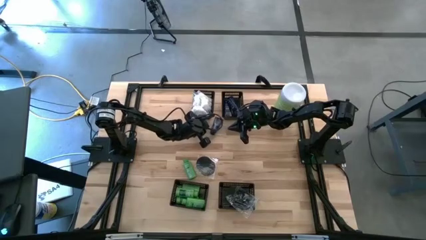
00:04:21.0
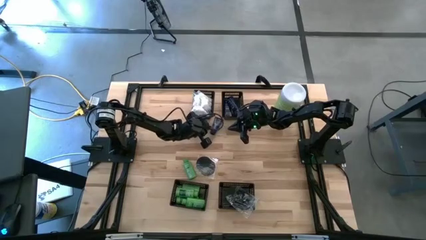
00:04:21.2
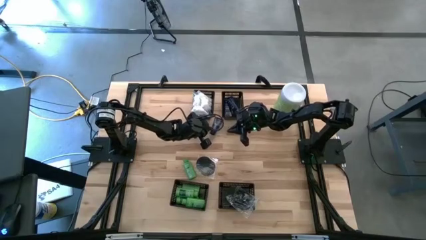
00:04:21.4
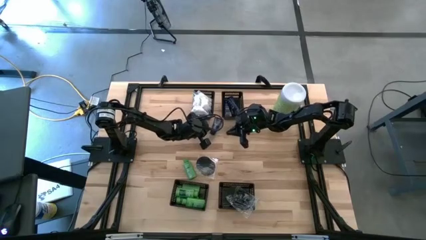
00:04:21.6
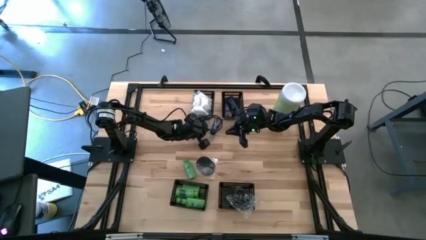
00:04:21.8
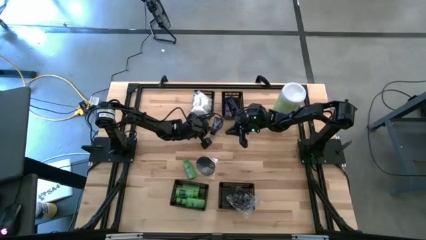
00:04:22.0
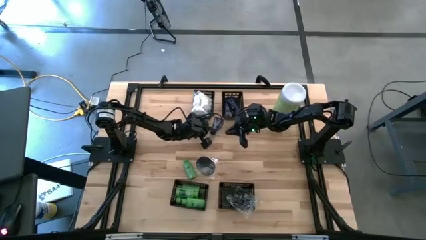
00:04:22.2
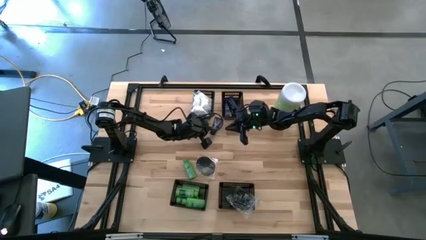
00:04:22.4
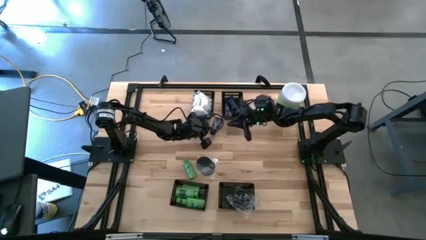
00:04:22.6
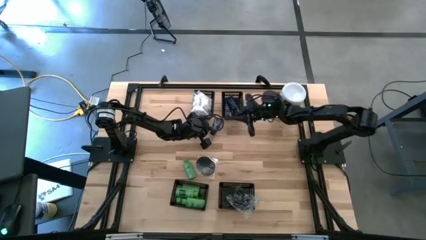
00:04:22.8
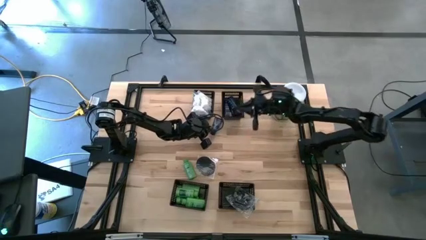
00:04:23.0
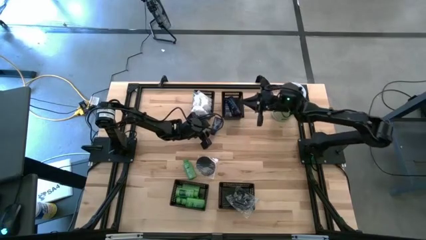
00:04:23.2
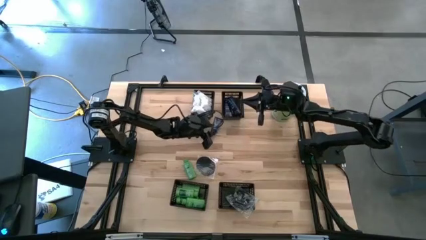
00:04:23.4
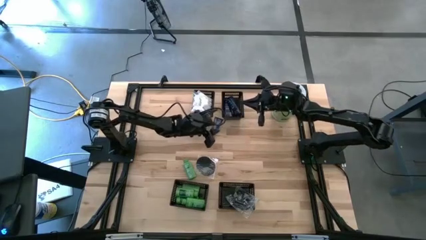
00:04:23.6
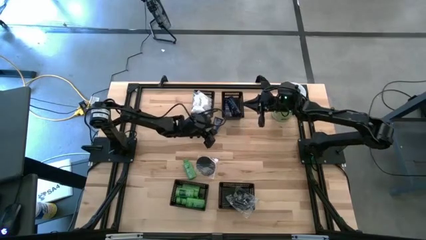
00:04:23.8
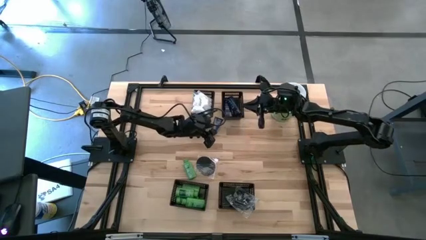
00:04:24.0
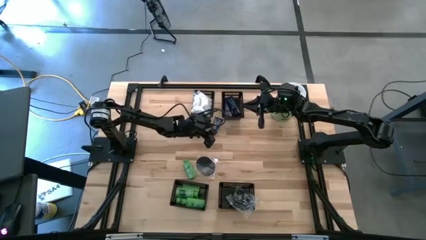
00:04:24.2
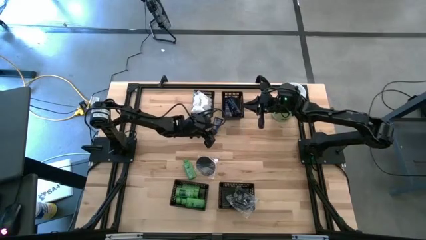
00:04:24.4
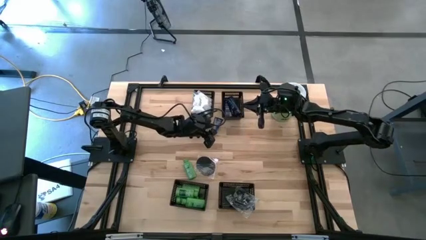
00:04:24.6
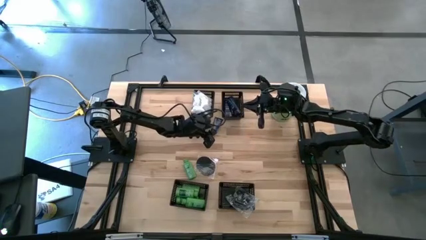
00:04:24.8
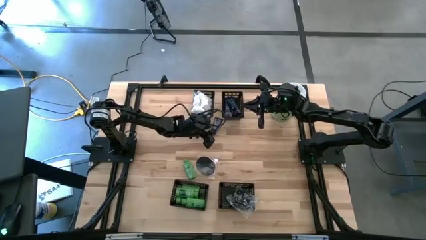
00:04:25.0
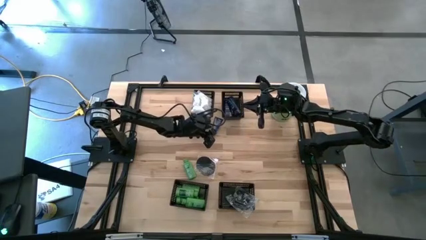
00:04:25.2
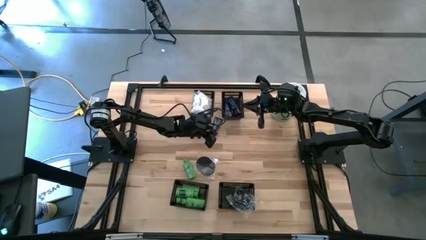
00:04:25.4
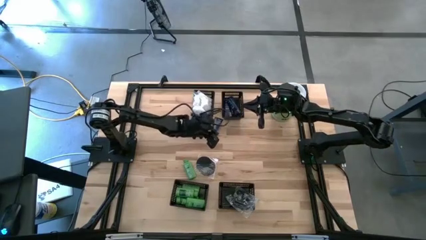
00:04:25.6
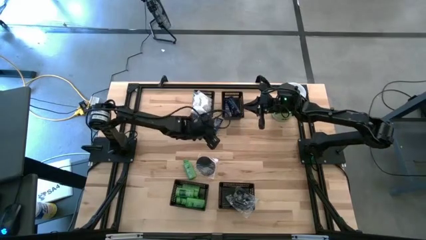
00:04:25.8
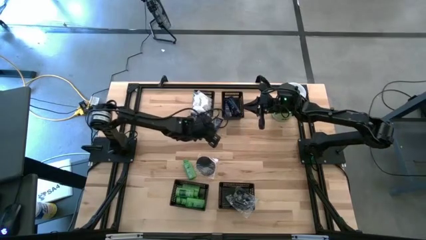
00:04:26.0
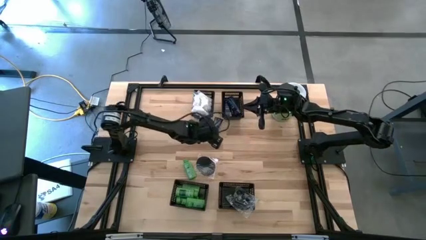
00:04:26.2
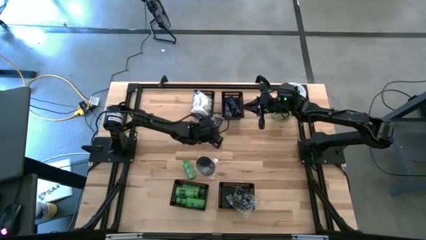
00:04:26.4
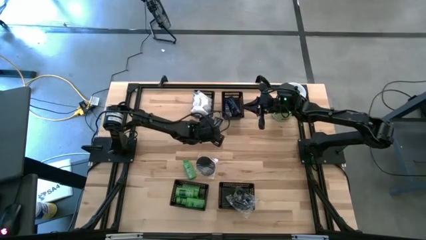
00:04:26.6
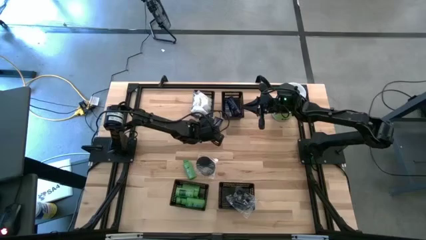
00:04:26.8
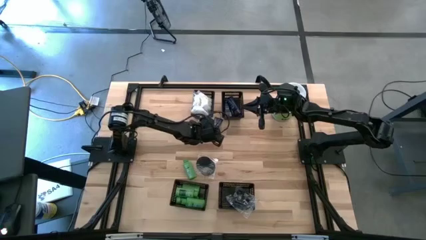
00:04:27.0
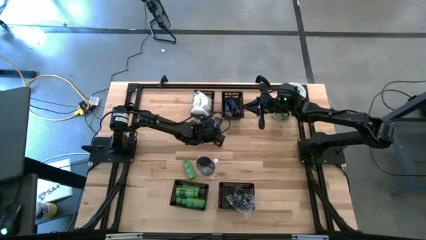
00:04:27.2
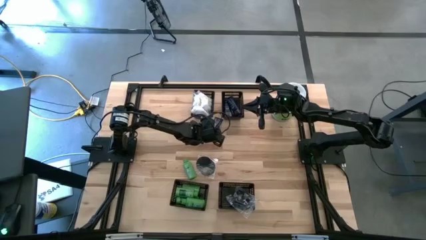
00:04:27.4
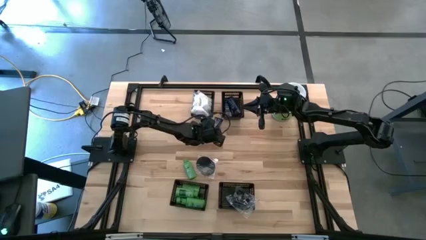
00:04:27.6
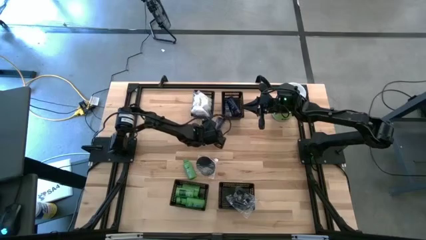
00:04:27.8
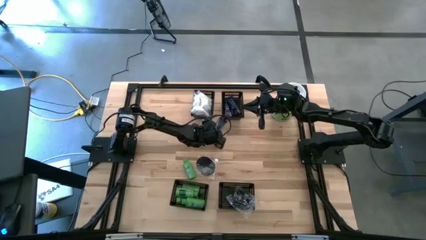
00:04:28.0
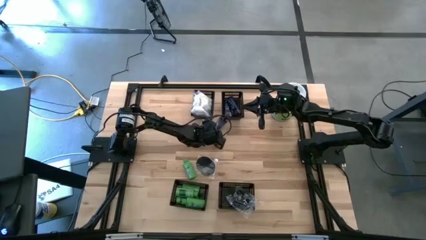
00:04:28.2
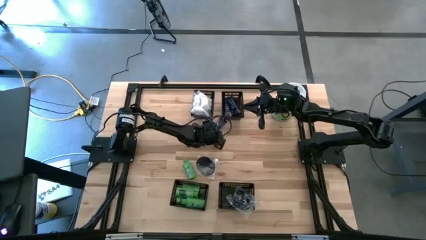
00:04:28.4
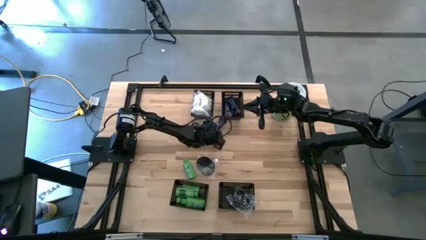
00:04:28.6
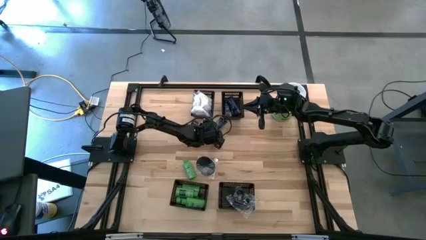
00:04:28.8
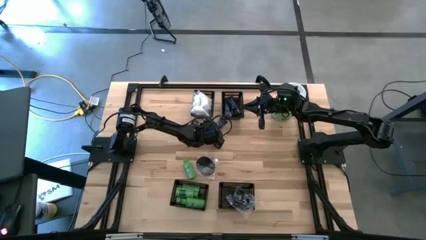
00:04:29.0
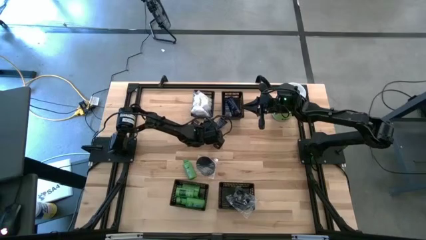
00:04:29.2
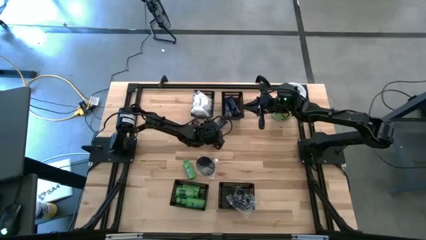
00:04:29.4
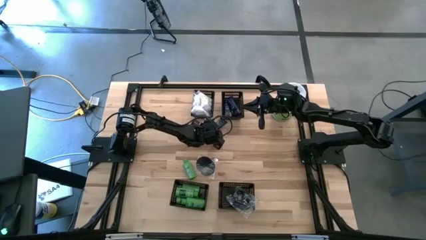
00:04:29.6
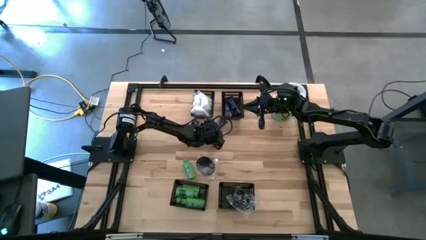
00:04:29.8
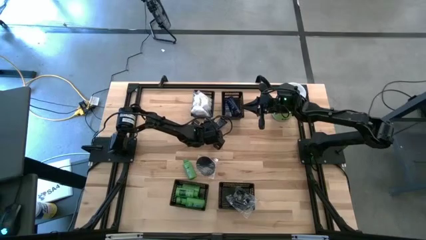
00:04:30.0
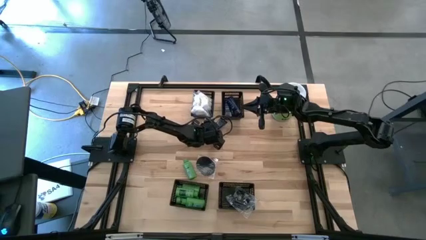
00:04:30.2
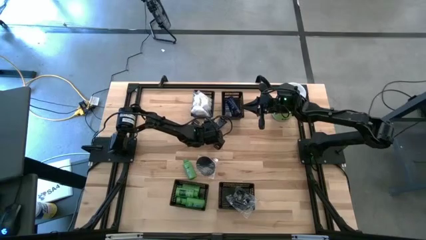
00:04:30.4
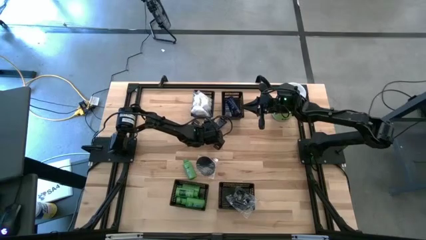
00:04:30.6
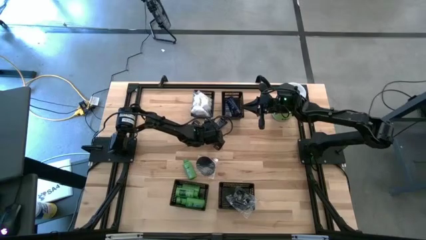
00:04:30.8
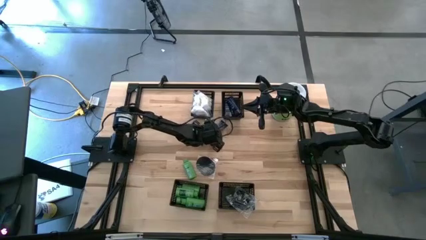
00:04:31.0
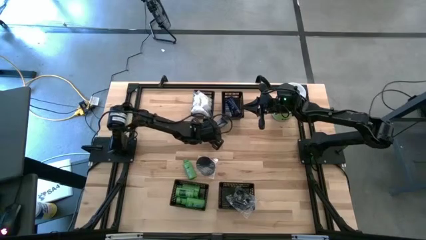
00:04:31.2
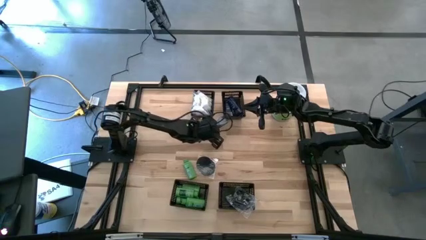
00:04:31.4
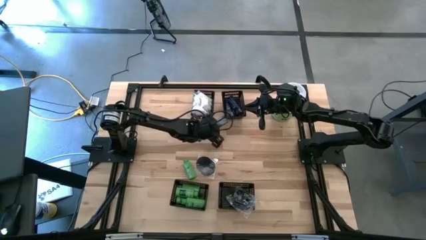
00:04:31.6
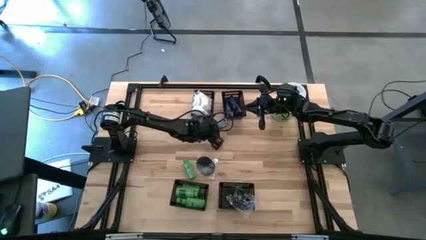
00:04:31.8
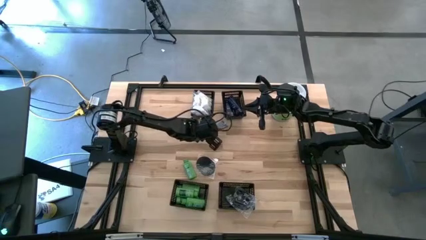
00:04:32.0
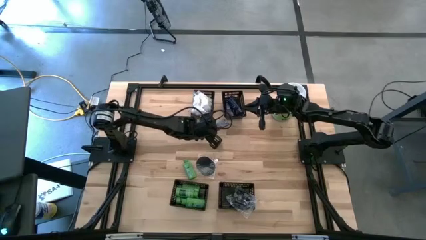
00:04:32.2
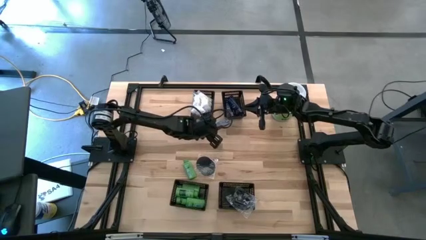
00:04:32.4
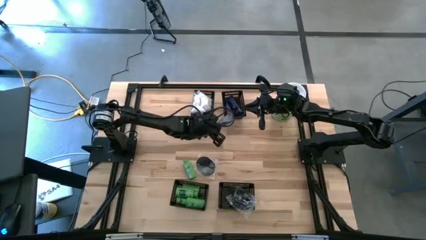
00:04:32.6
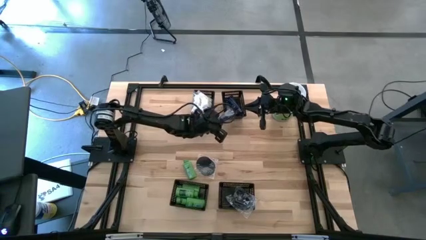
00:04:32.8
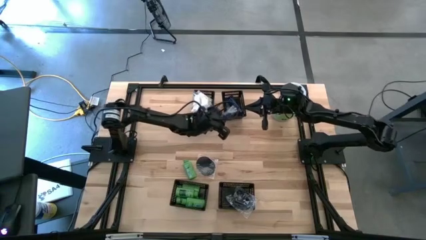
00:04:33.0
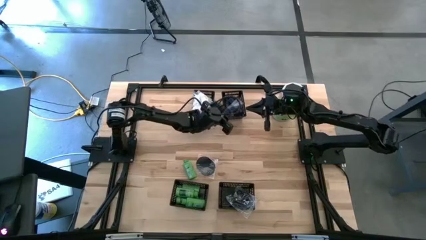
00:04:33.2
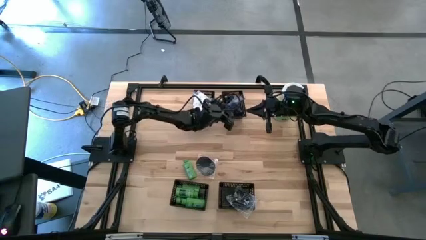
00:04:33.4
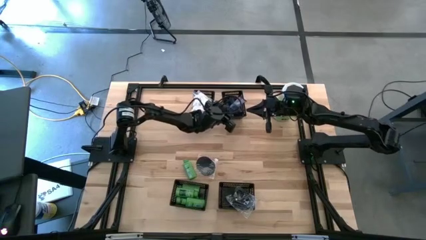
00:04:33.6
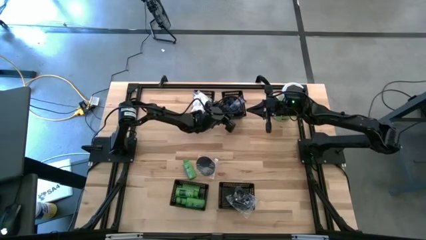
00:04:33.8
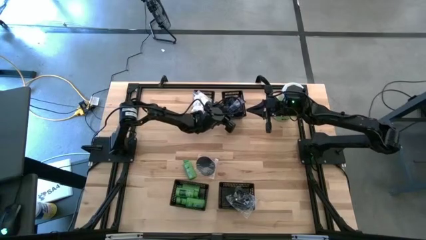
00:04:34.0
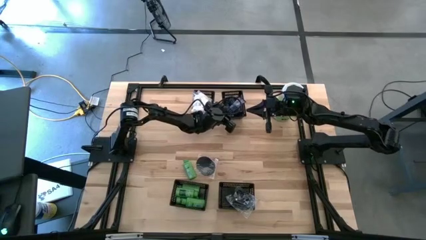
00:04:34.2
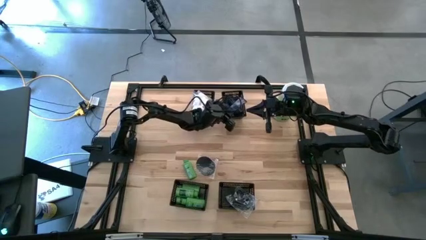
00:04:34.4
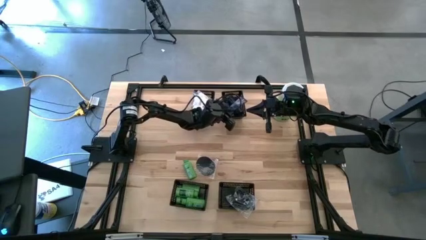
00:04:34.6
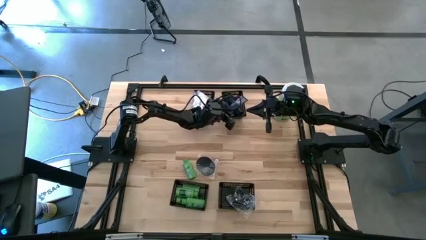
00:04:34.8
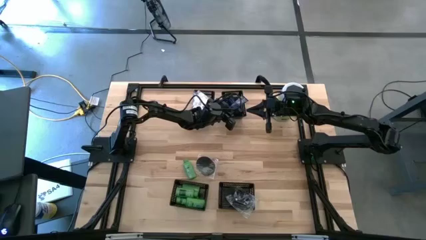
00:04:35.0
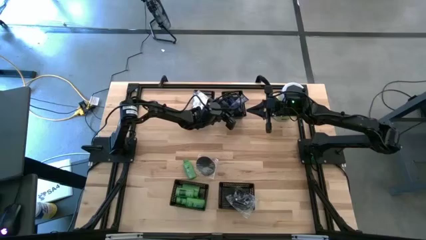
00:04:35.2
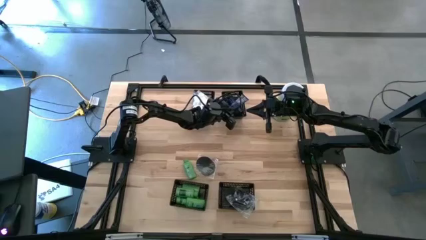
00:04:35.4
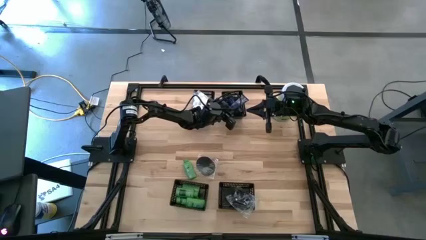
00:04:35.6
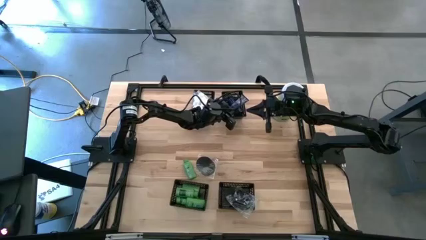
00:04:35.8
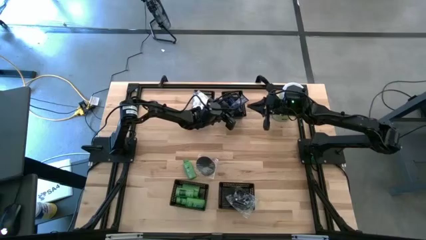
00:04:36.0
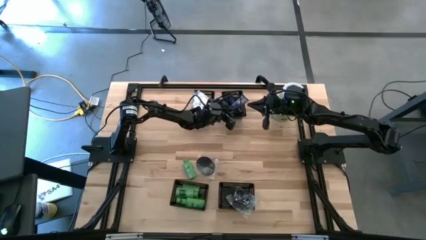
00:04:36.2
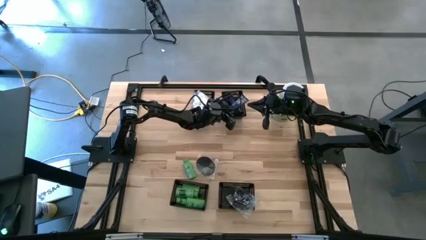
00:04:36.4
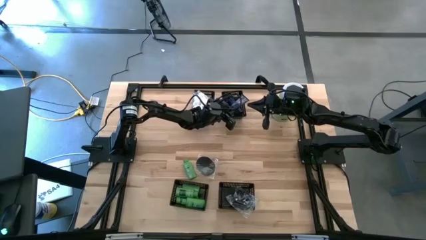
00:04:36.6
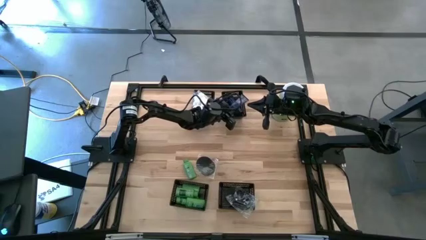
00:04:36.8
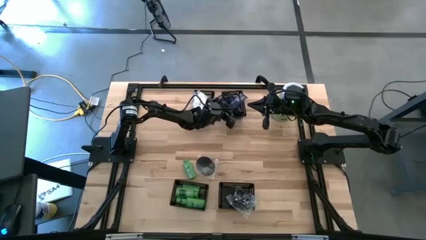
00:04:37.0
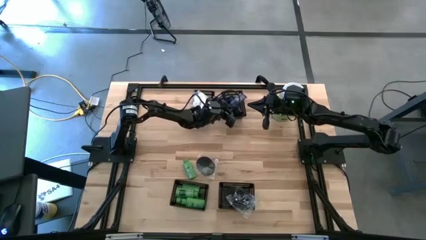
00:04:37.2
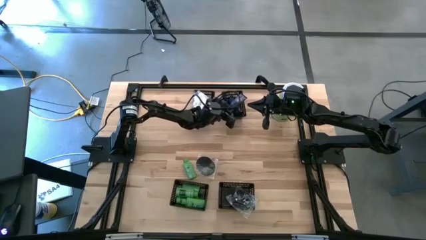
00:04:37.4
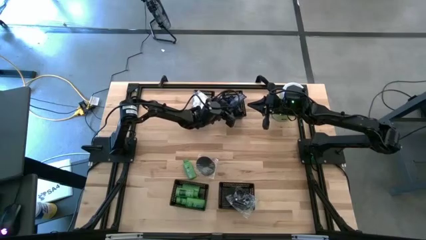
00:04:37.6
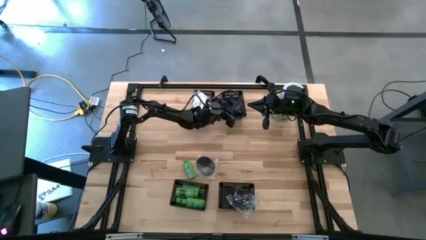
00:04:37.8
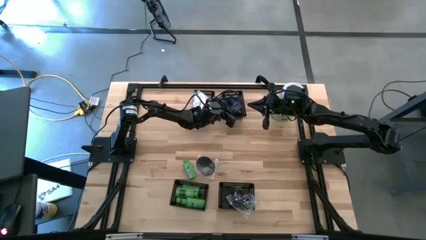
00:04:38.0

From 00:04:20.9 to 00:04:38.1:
Task: Pick & Place Travel size toiletries
Put the blue shave cream into the top right black bin
